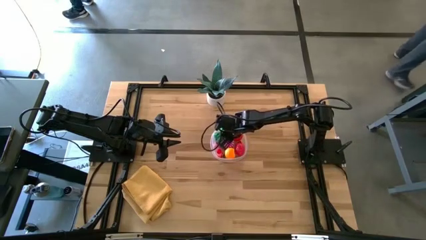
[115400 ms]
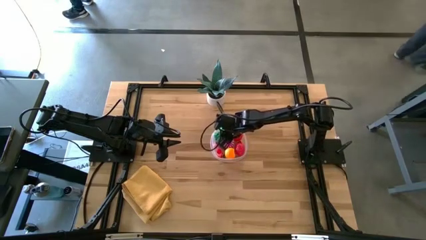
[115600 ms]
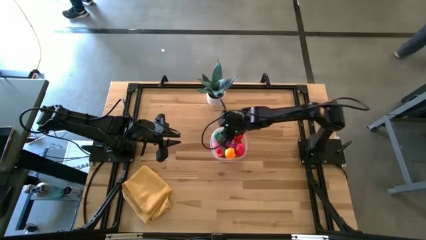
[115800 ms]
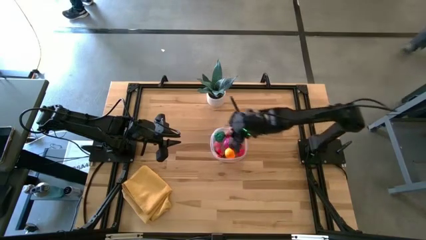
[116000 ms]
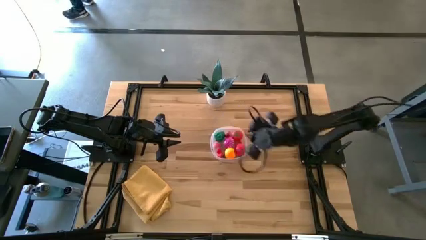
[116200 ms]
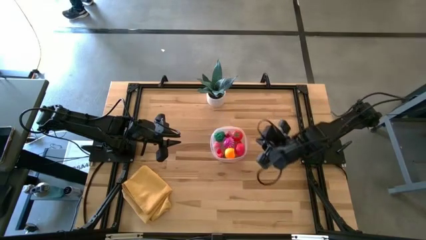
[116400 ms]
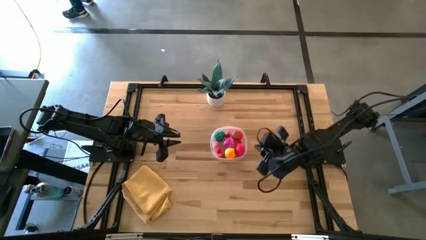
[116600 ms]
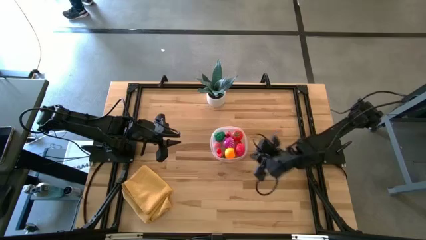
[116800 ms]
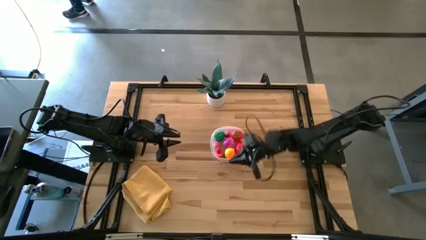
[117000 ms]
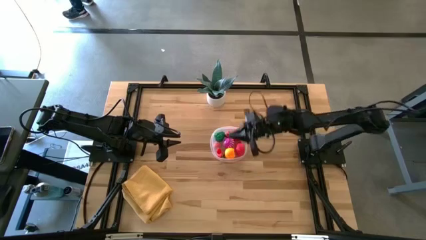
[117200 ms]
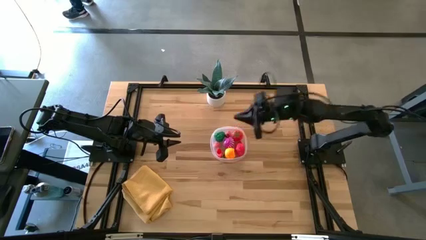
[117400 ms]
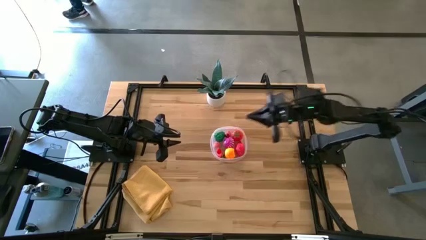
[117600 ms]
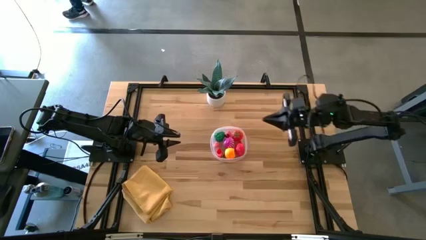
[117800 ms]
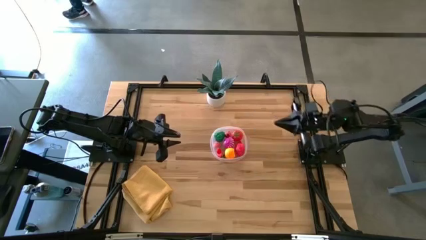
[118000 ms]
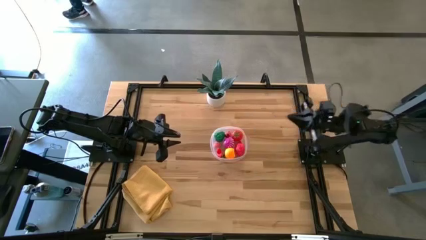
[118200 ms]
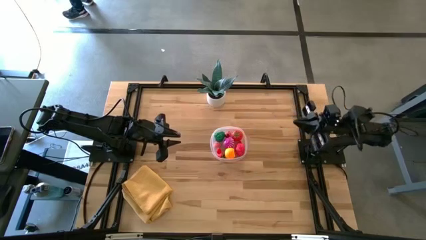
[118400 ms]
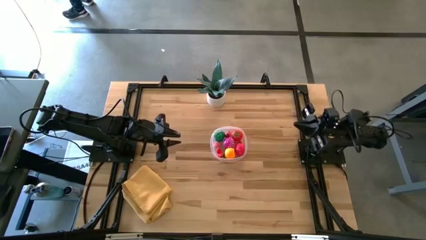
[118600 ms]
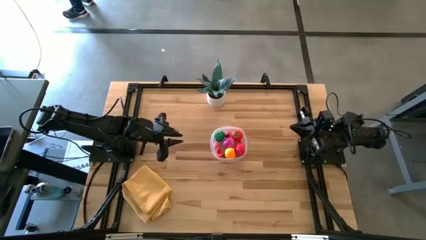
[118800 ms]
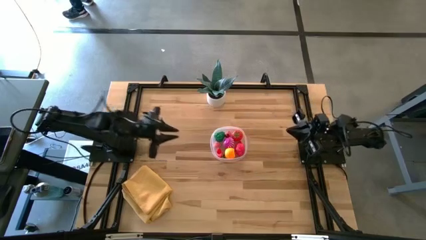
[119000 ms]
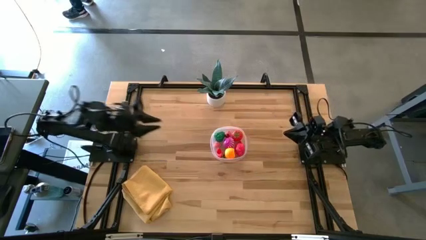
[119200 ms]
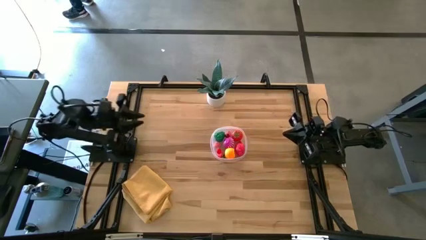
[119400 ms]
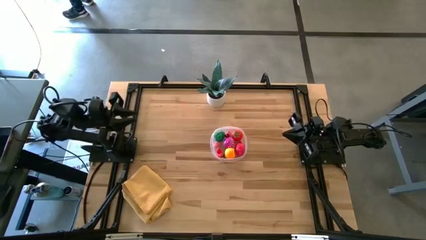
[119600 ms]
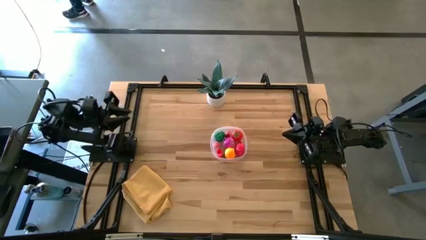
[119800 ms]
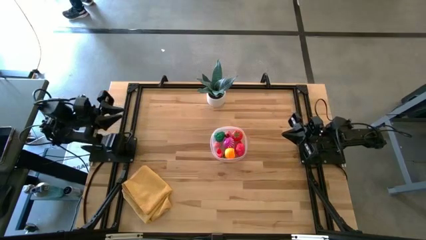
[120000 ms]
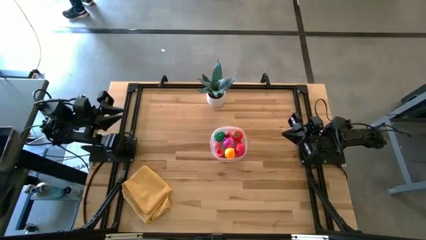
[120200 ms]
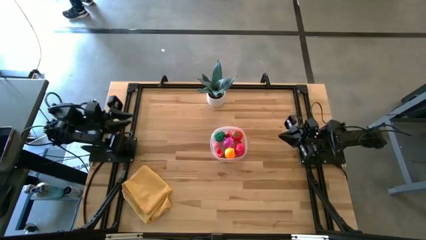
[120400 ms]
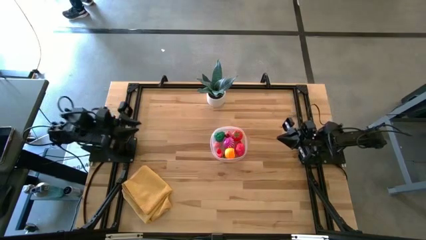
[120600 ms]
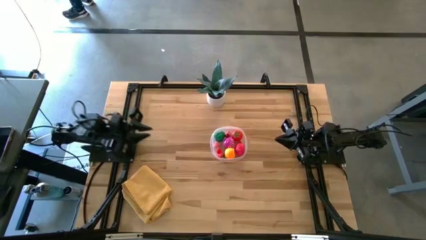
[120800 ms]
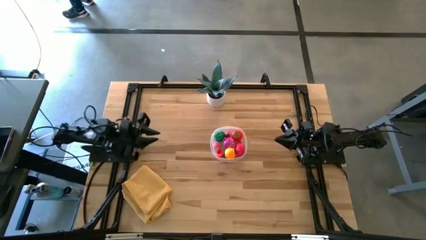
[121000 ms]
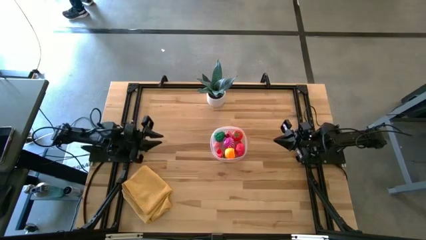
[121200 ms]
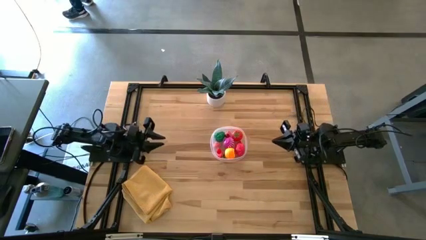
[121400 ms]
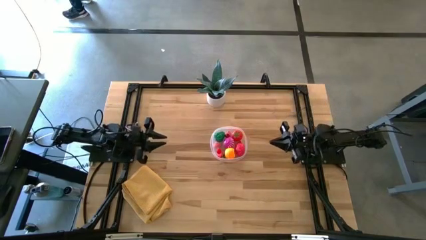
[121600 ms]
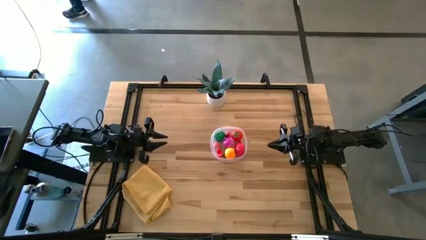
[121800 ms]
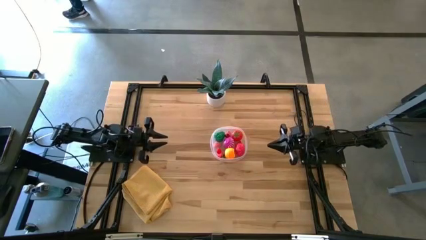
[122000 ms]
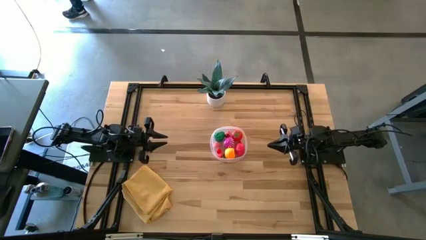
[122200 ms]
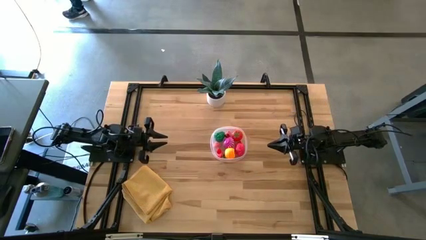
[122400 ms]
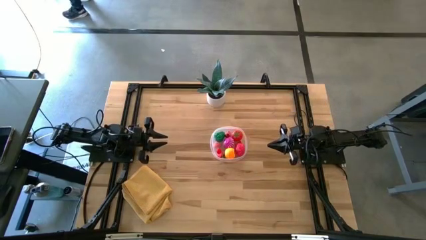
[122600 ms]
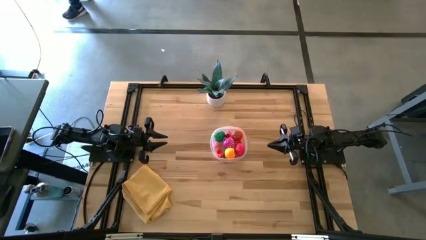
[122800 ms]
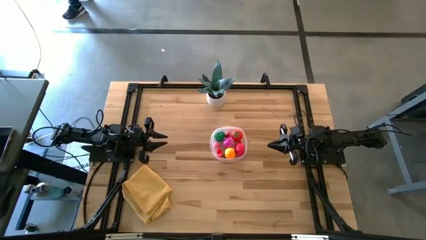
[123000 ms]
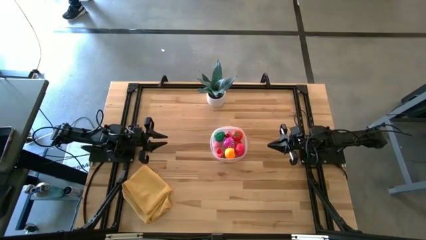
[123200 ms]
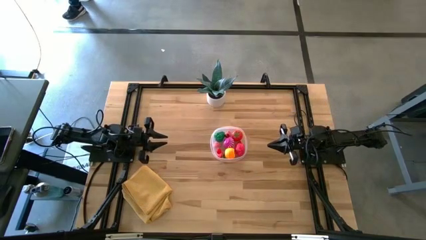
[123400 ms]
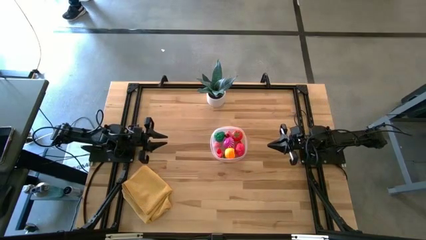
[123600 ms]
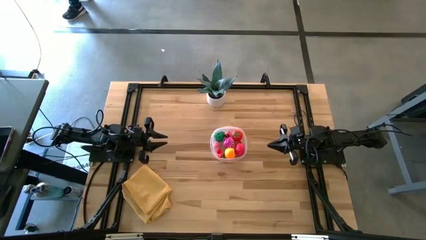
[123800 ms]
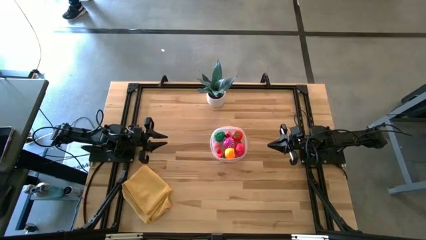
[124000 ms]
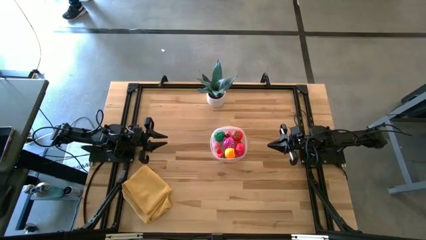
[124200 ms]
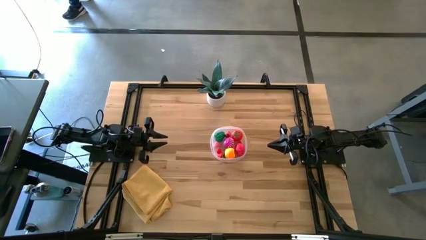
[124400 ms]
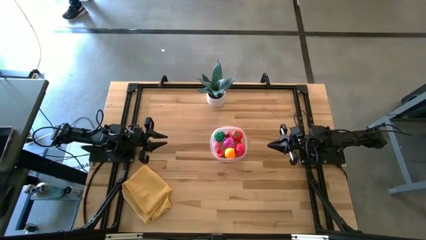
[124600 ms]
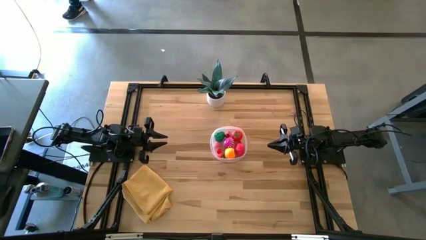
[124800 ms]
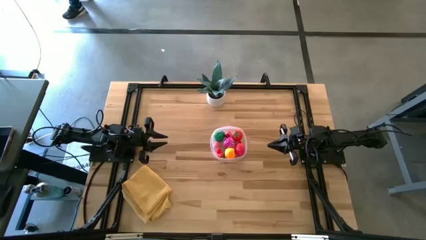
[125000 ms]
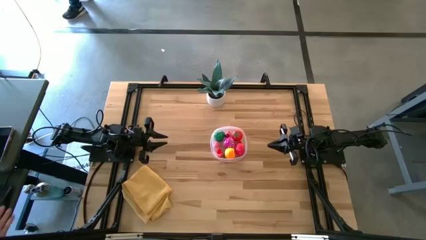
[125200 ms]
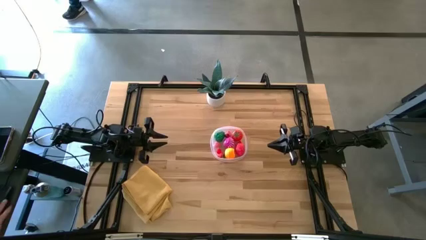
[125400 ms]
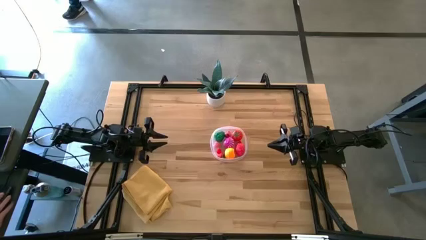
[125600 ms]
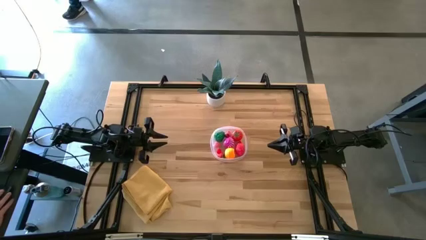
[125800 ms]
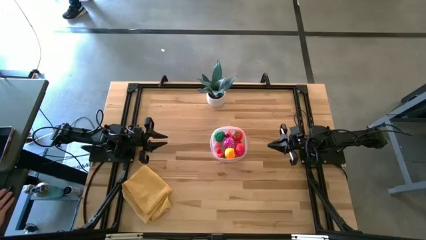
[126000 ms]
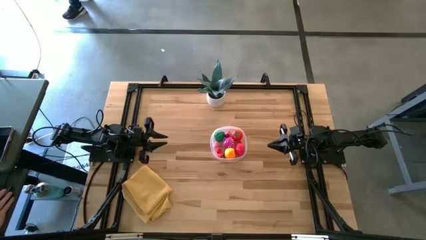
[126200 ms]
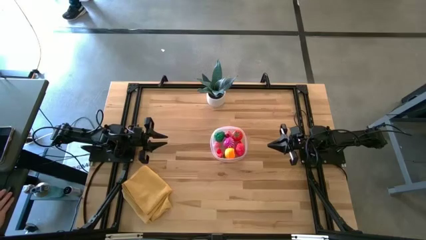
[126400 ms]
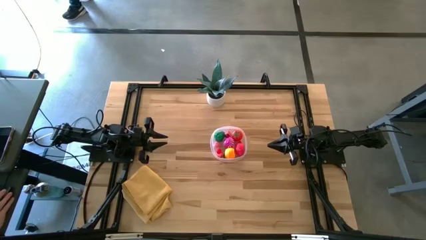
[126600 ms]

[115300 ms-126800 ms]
Task: Pick and placing Produce into tupperware
Return to Home Position

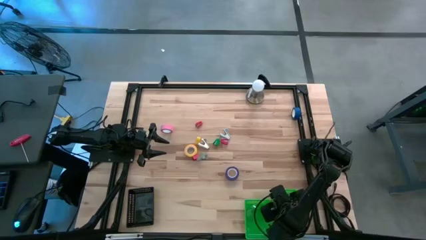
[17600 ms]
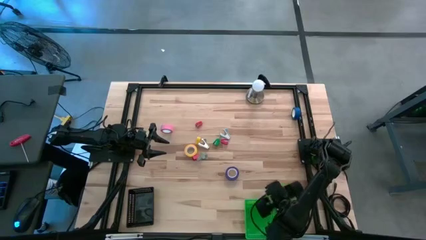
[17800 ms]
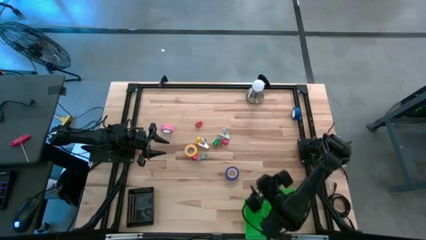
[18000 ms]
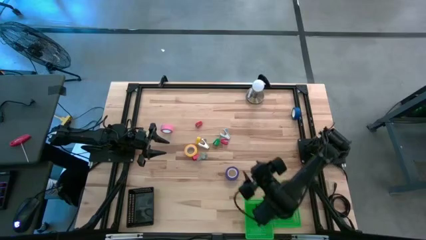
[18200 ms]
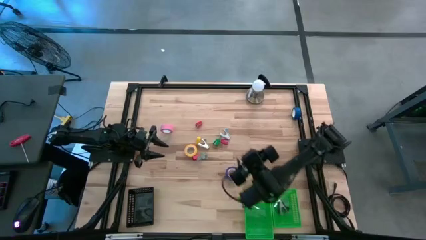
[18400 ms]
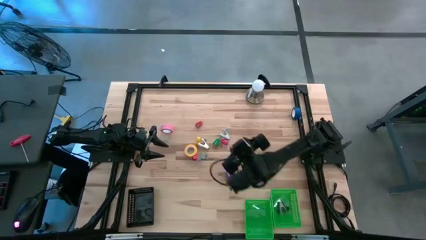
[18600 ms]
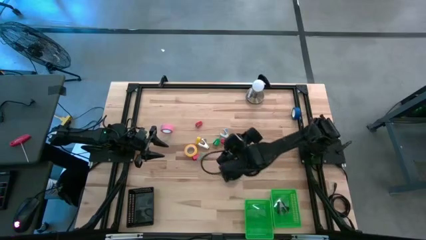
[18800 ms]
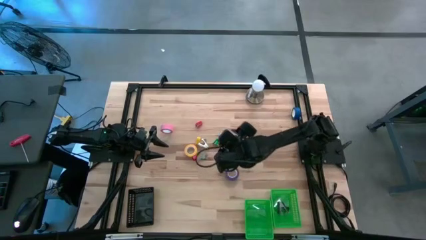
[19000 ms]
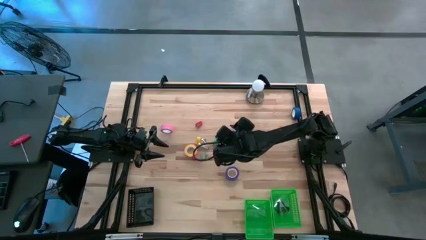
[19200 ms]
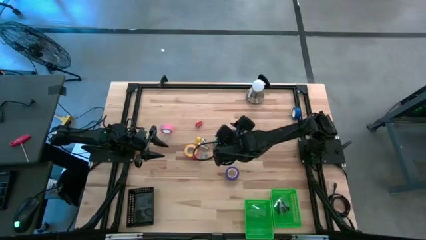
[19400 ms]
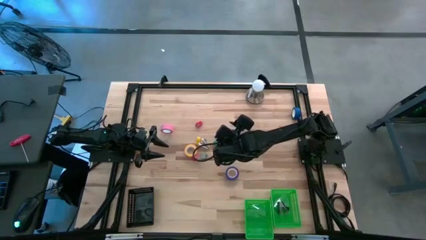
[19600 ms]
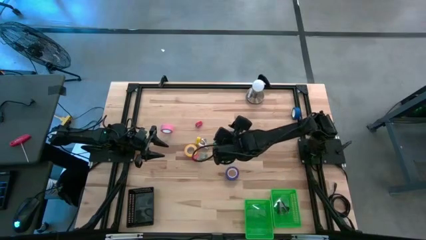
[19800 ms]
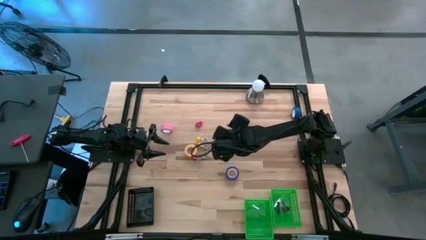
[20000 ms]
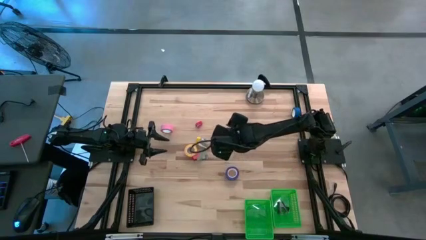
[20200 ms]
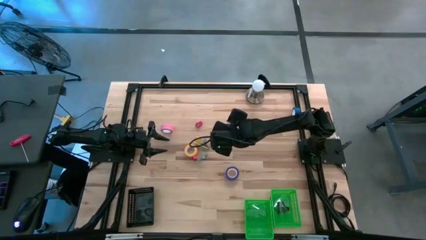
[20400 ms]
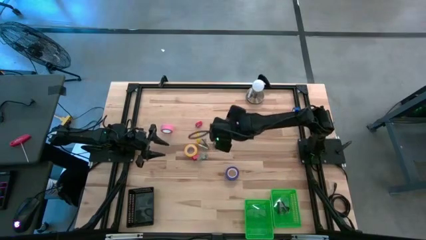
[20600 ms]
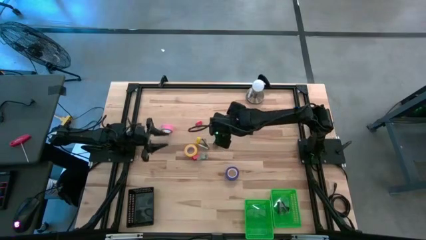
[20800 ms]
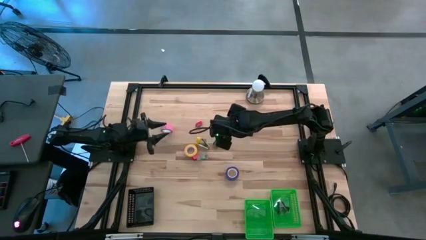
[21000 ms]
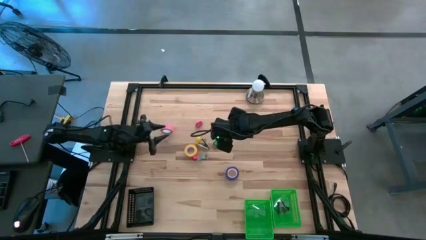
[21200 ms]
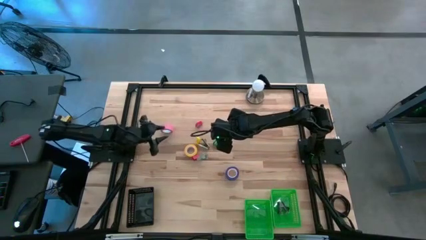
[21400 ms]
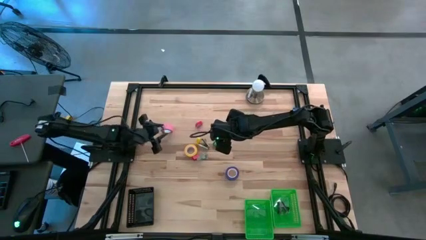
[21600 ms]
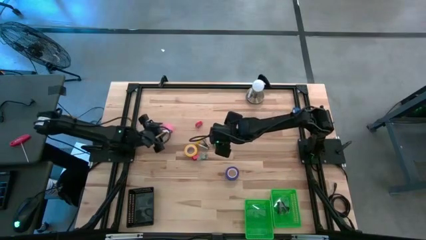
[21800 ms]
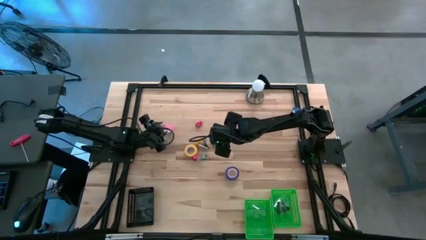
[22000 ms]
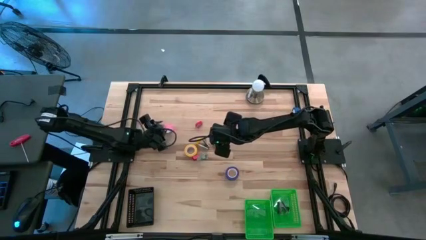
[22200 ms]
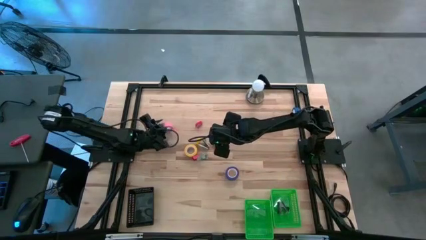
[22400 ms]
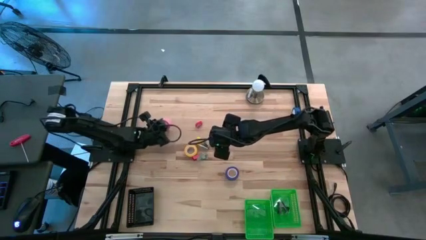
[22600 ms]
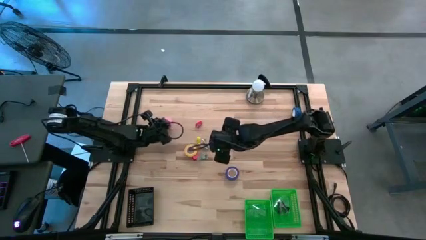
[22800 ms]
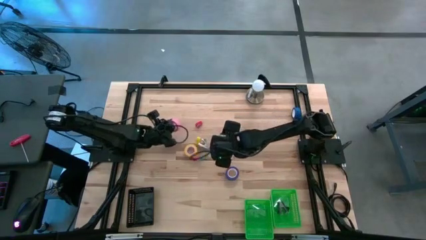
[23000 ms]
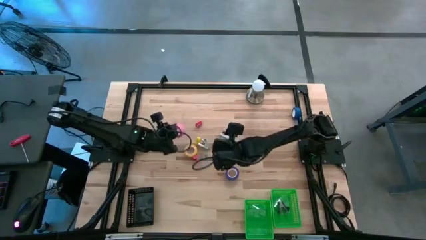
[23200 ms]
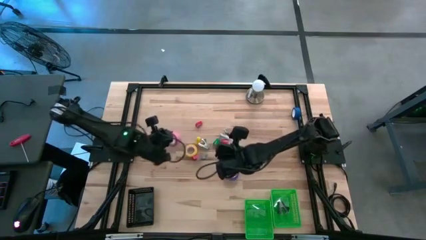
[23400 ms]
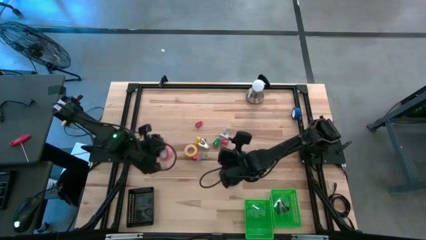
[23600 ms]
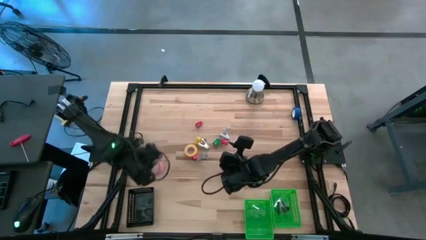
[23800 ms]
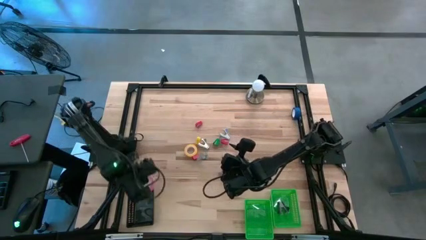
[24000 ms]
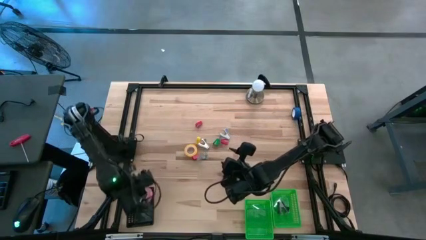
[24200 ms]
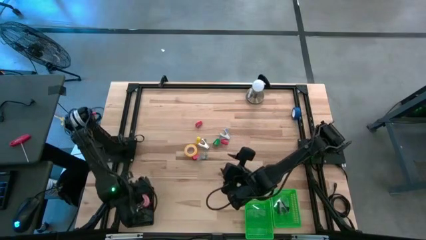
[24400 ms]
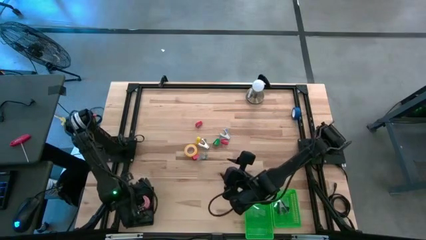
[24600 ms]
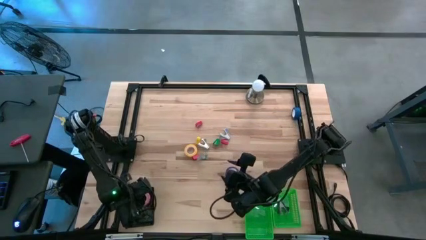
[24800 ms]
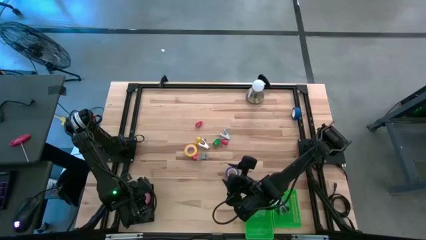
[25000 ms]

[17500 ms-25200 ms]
Task: Pick and place Stapler, Stapler remover, tape
Put the pink tape into the black bin
